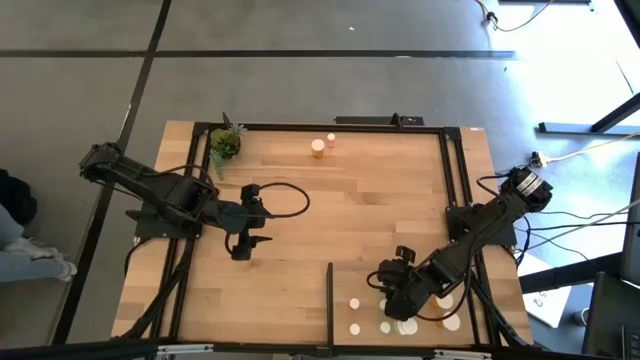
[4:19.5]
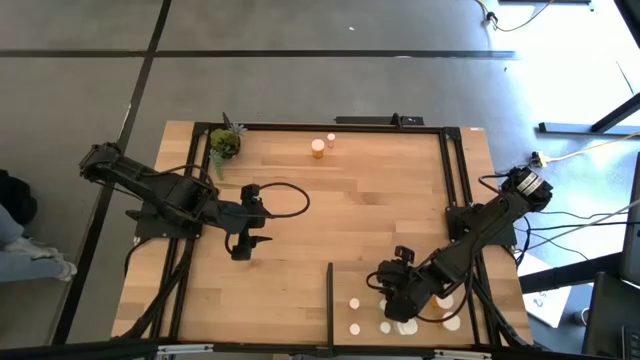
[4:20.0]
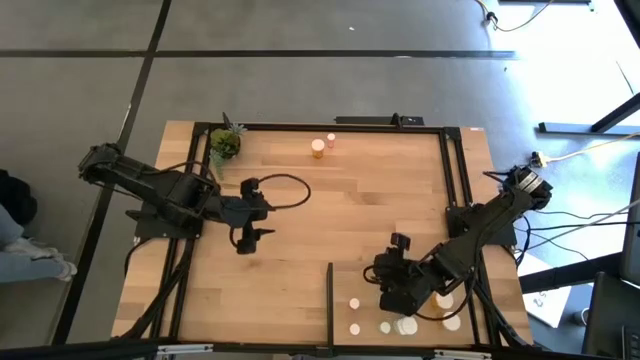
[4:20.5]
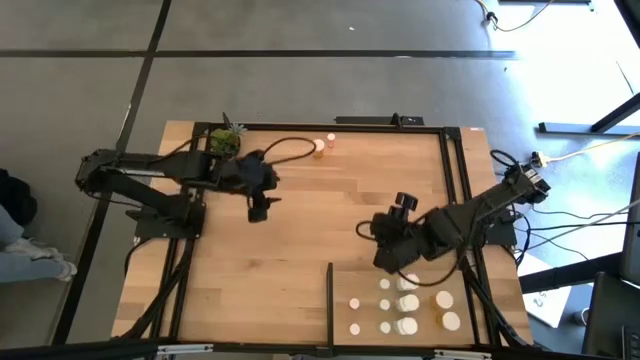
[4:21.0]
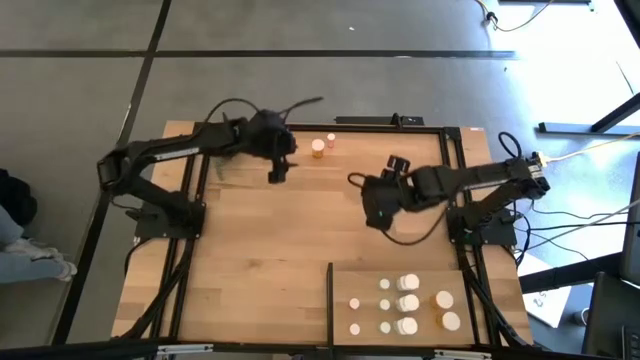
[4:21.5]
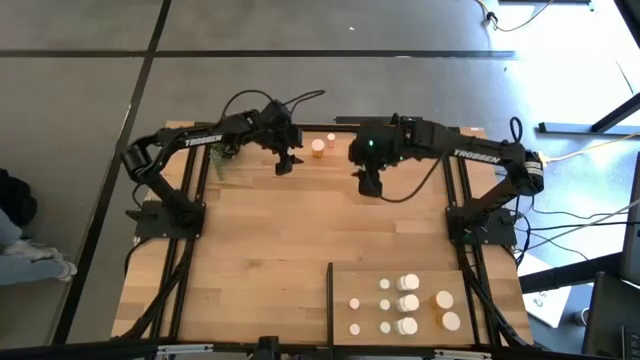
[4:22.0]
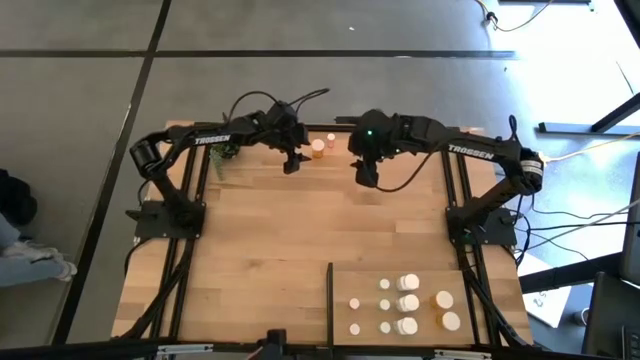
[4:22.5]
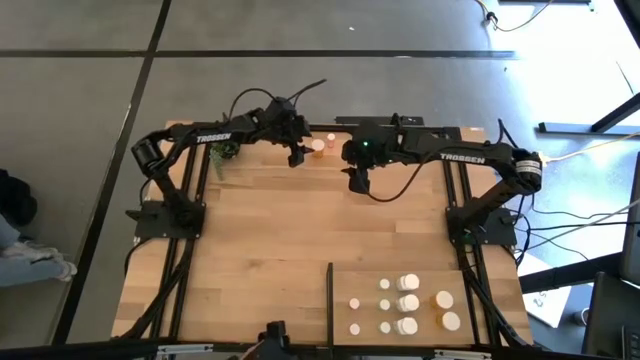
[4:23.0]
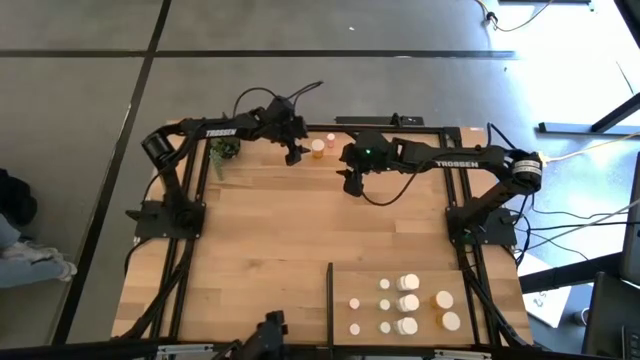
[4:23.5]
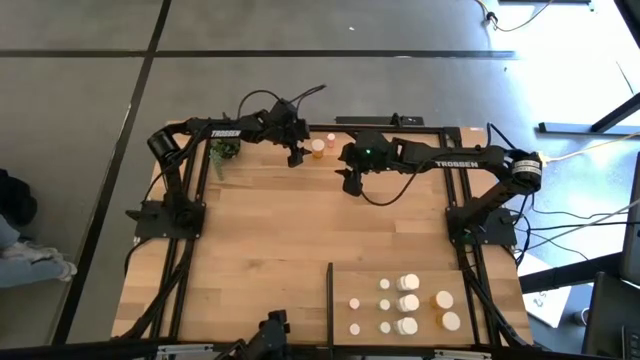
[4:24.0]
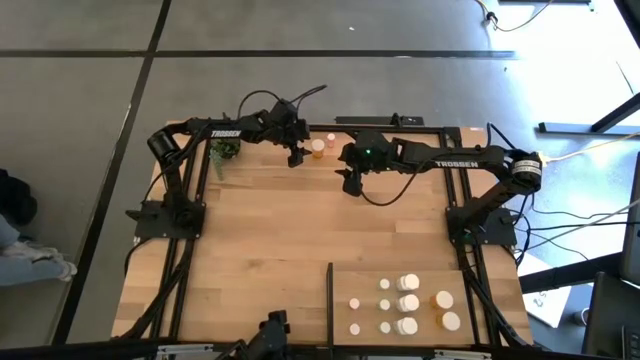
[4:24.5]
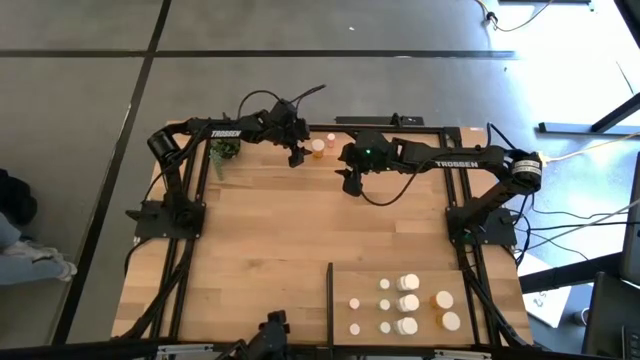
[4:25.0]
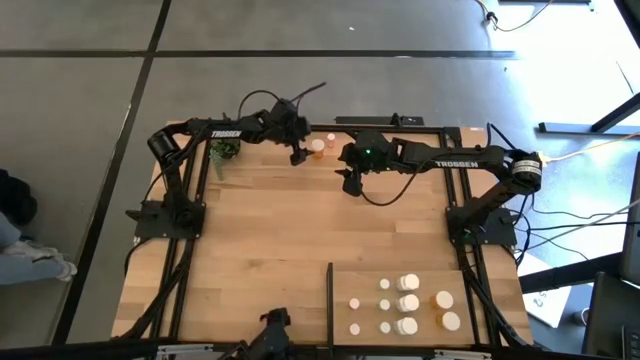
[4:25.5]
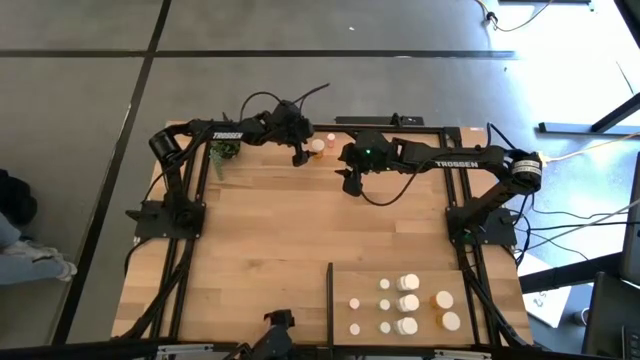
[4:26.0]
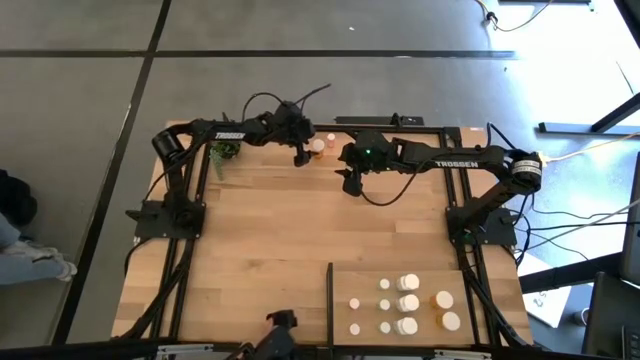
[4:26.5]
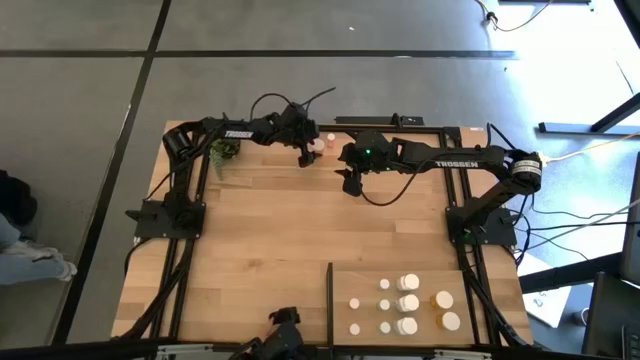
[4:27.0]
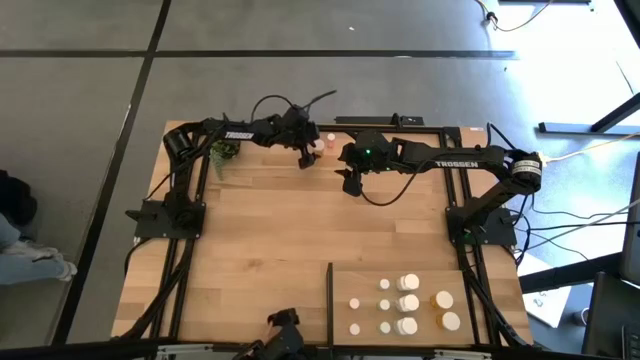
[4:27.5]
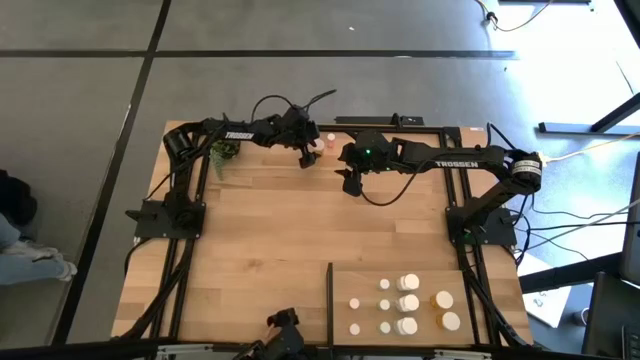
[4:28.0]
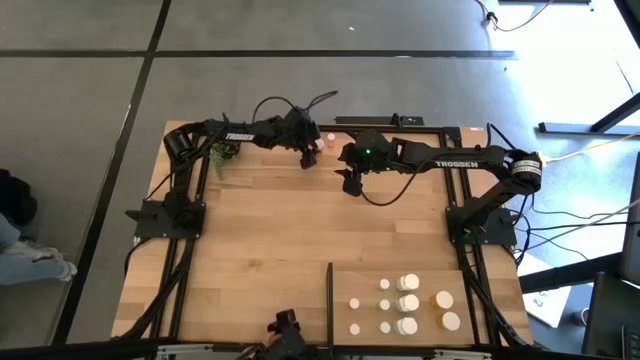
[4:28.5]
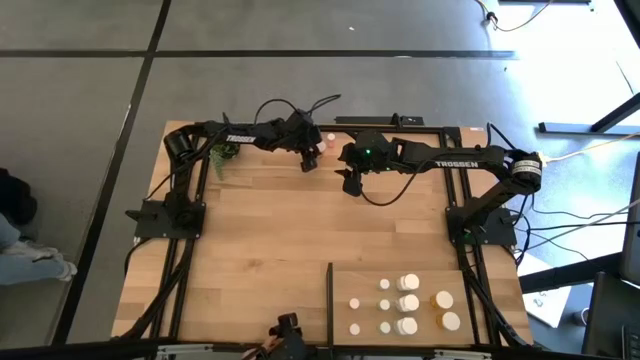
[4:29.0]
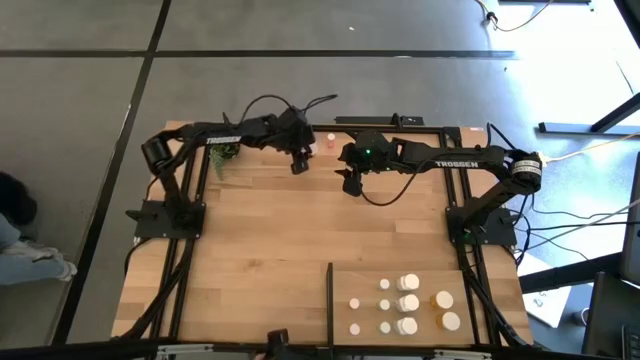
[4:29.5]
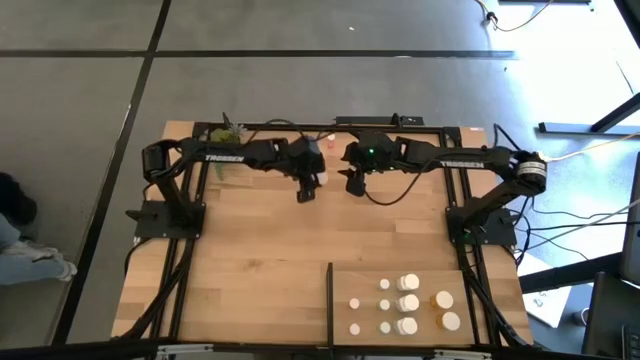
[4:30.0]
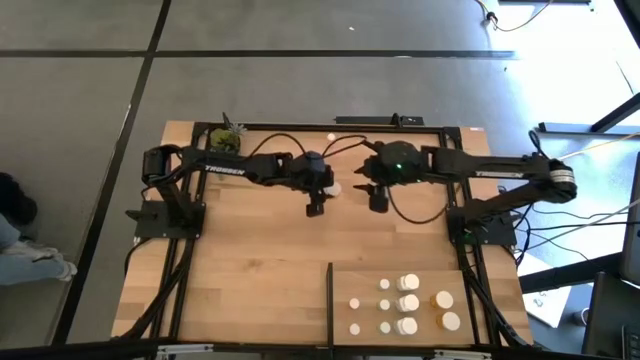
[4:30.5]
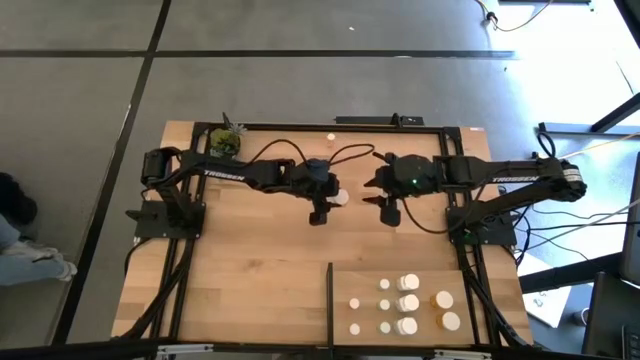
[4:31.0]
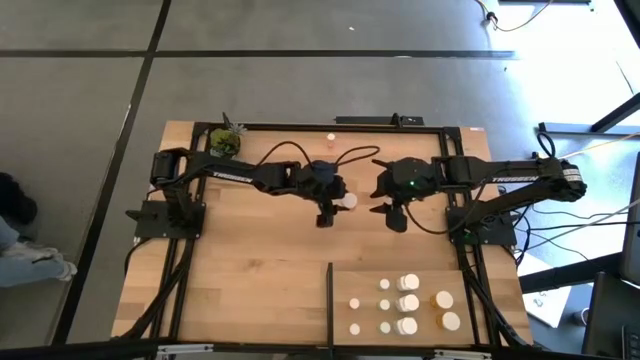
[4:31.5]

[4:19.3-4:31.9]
Task: Pick and place medicine bottles onto shelf by color
Put the orange pill bottle on the shelf aligned with the other orange pill bottles

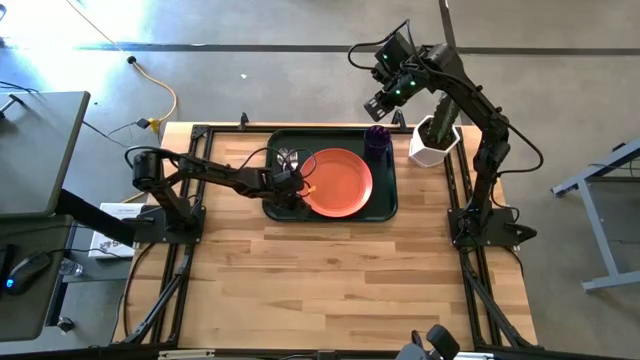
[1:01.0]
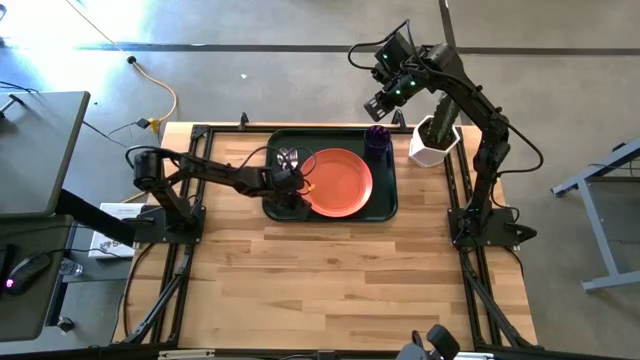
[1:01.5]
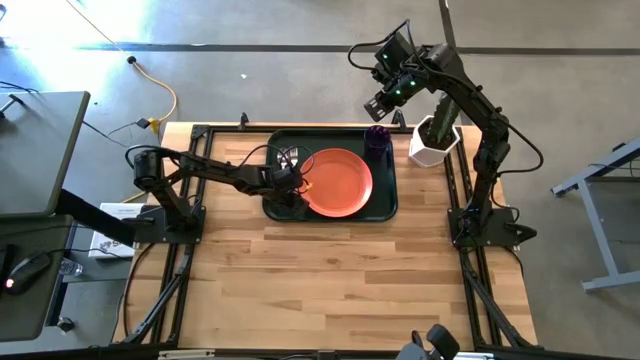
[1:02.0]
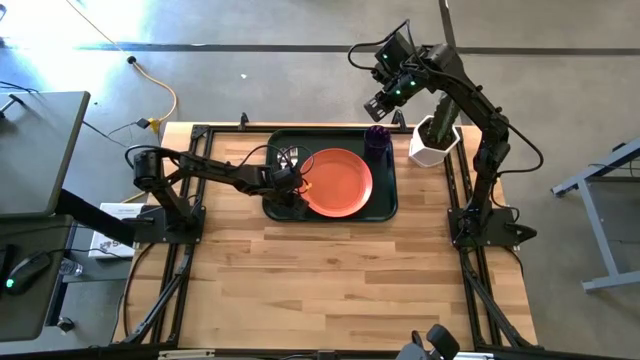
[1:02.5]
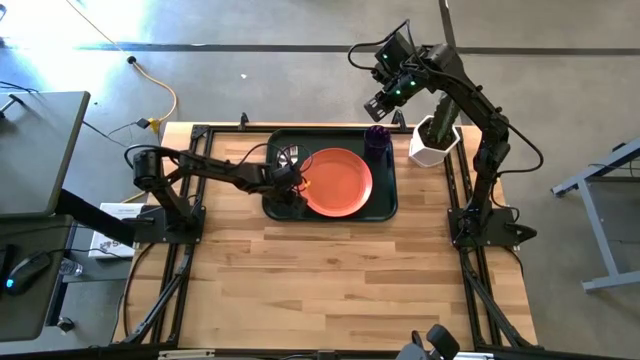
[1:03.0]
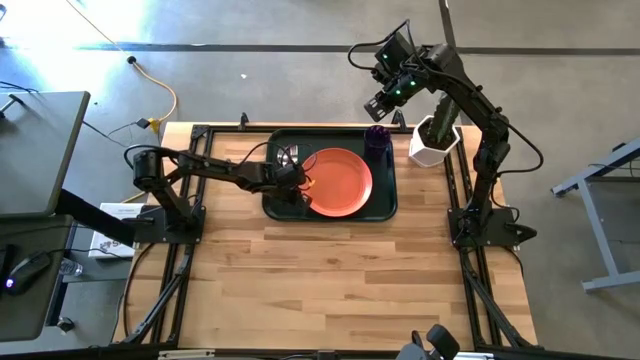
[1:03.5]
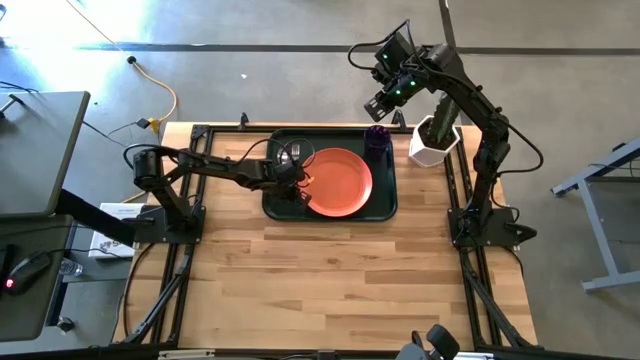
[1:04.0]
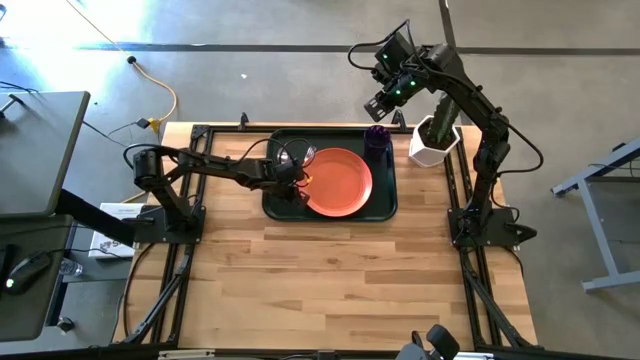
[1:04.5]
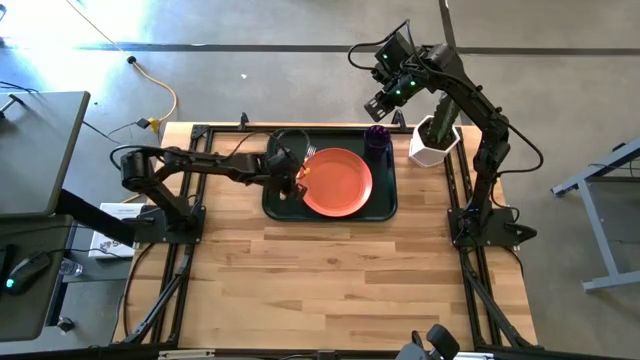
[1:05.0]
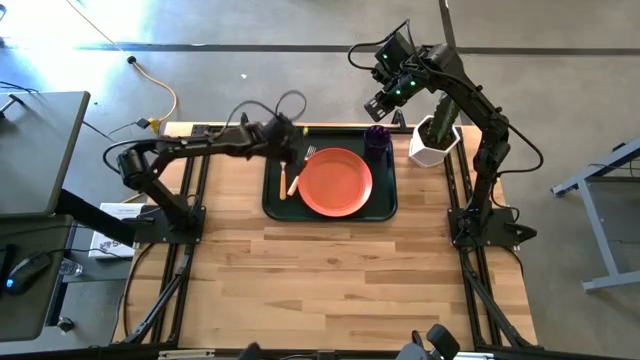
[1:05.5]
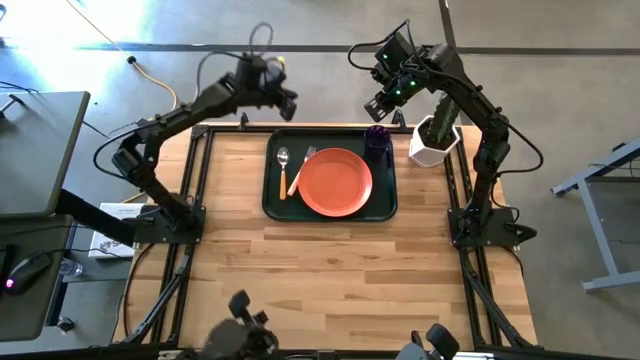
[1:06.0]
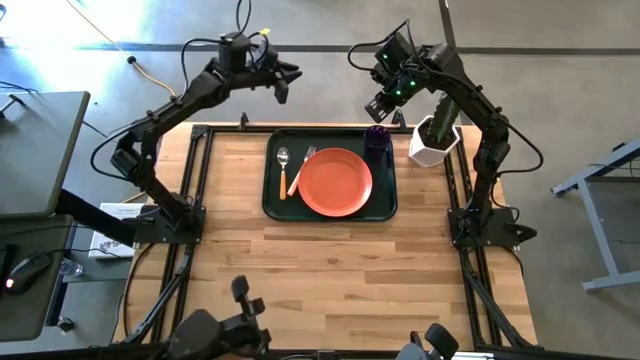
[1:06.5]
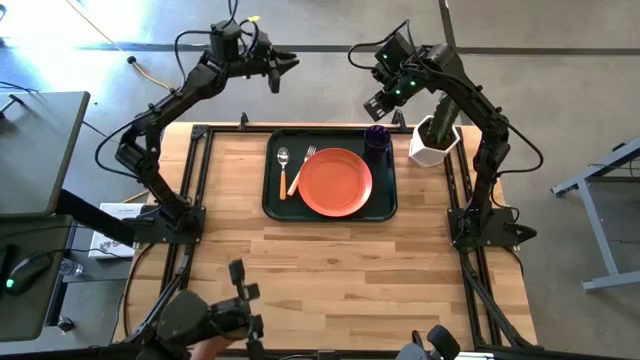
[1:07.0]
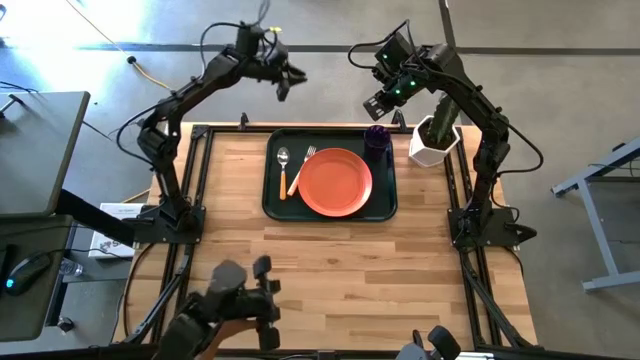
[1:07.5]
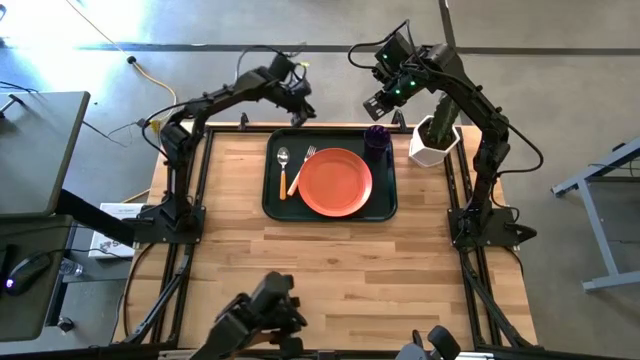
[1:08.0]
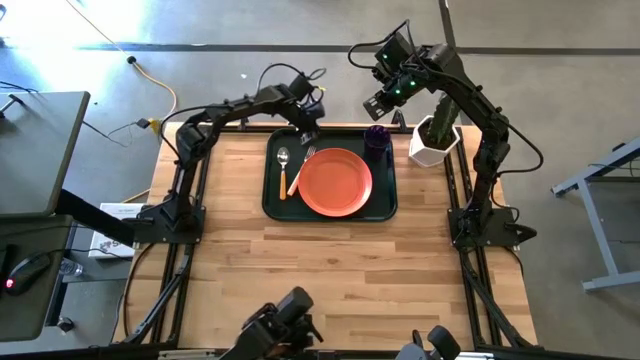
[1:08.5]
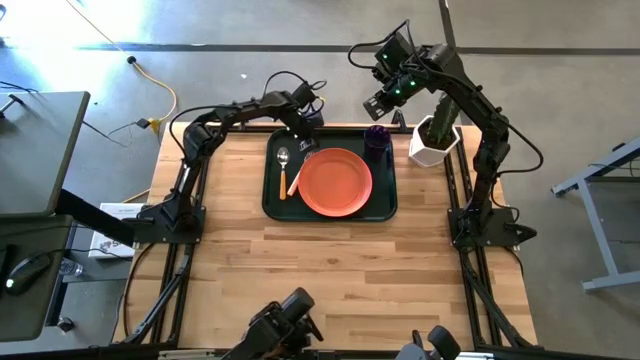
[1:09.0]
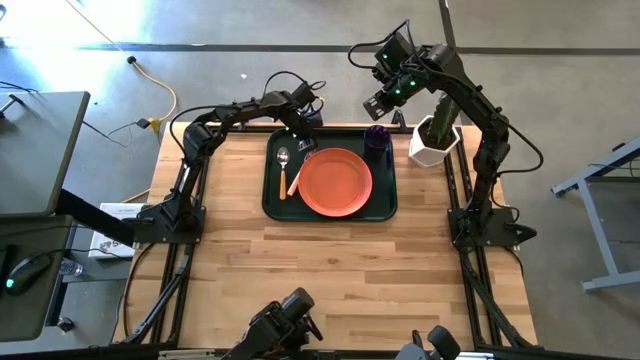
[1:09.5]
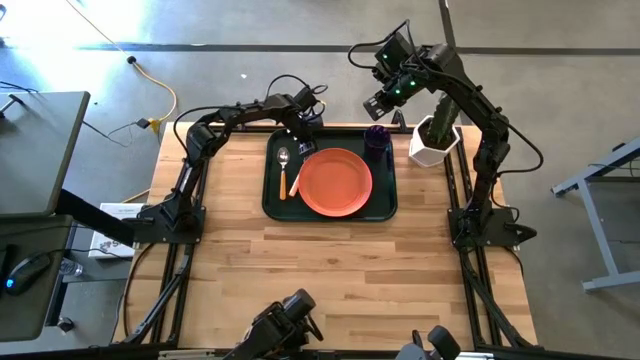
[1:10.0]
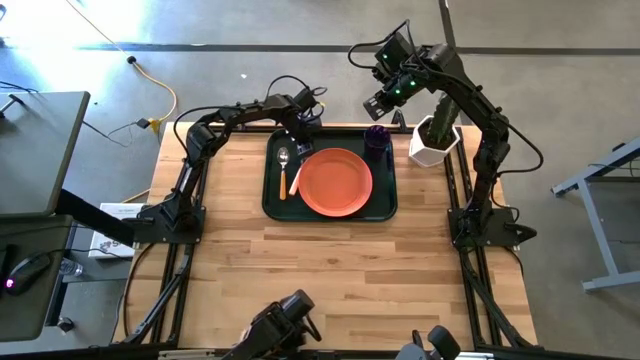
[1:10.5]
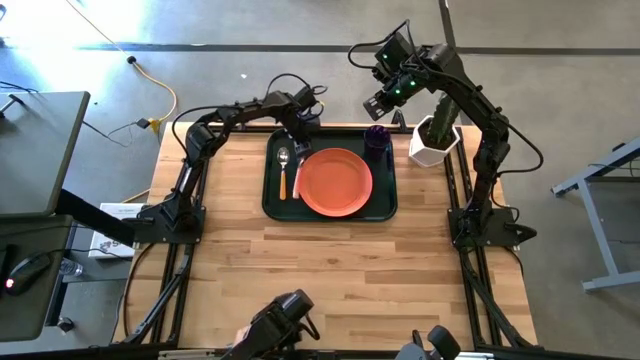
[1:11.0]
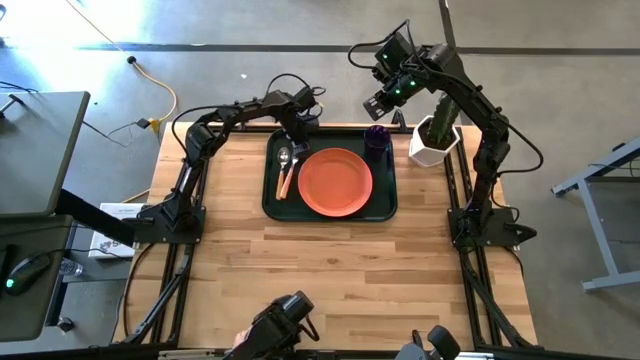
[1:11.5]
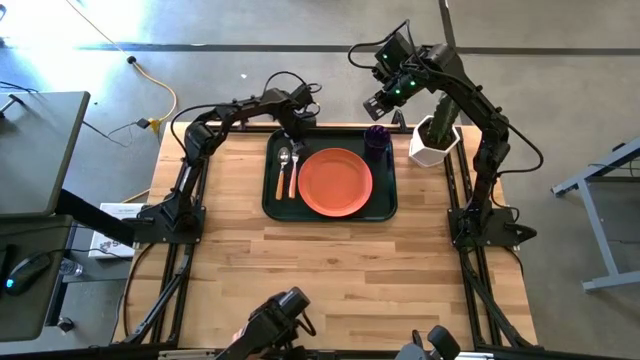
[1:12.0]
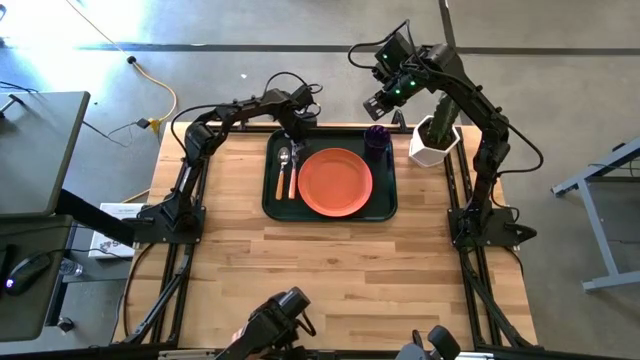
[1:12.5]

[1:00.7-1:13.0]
Task: Pick and place plate/cup/fork/spoon on tray
Adjust the light orange fork
